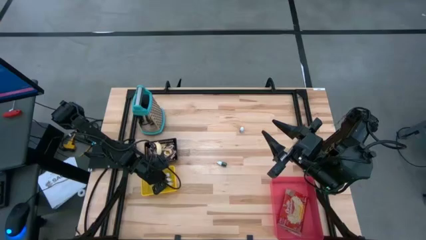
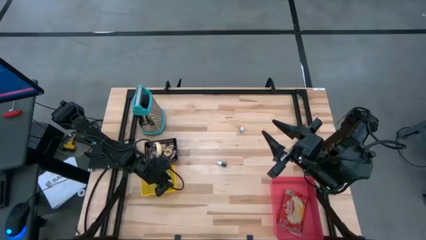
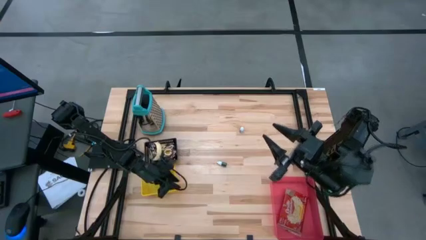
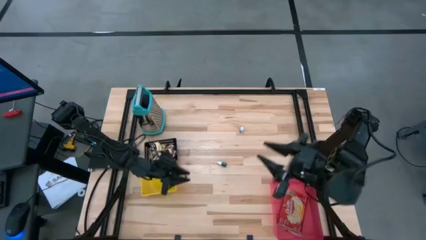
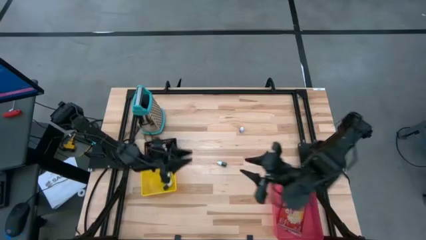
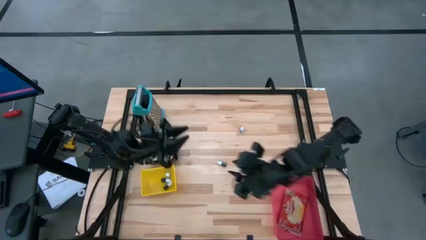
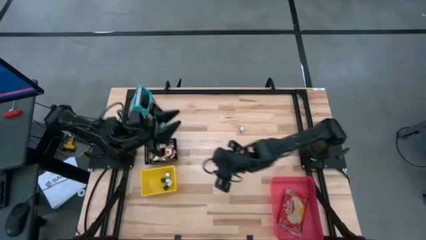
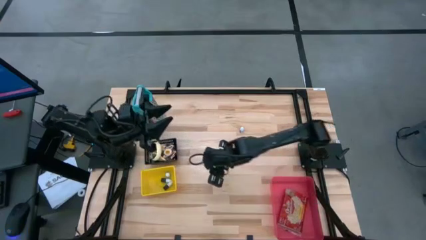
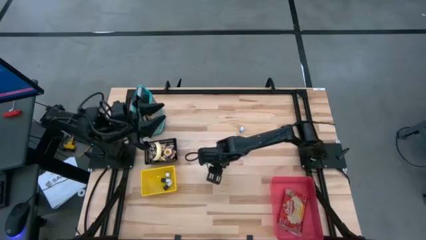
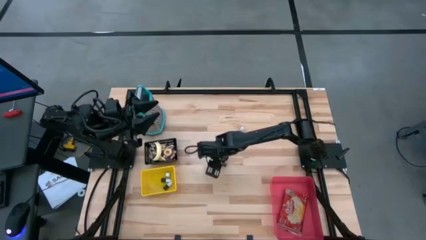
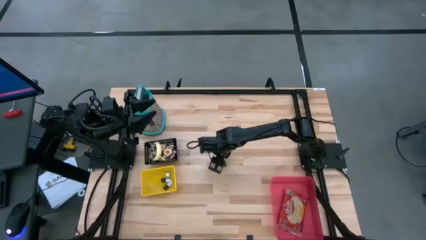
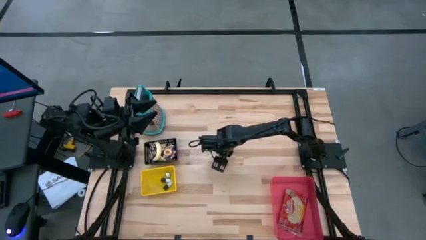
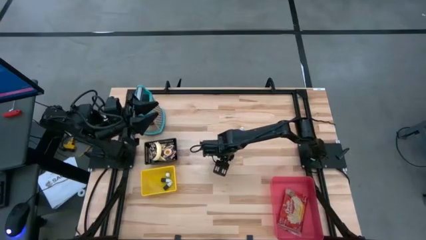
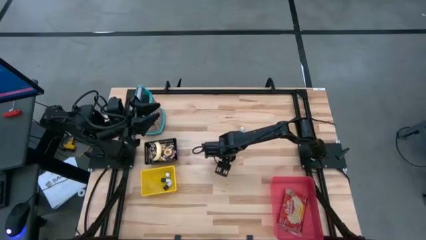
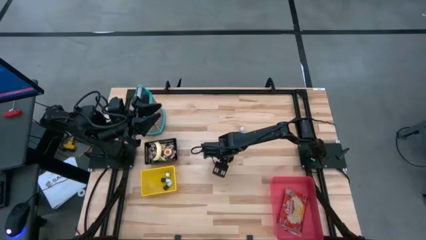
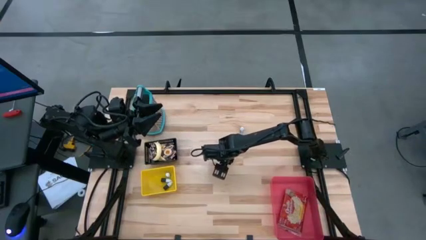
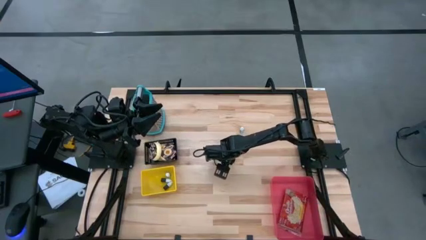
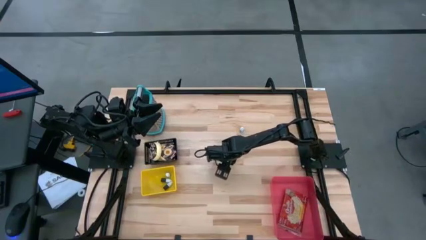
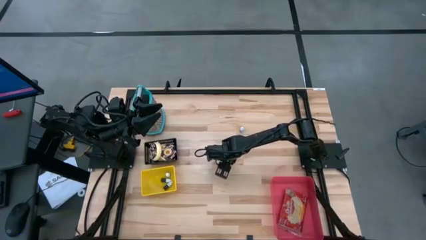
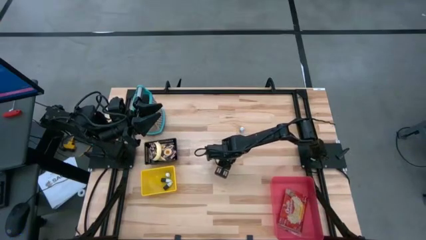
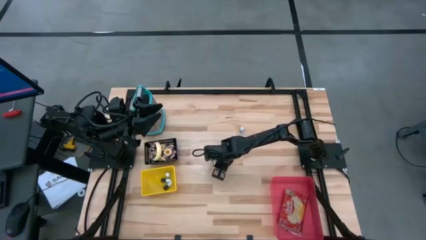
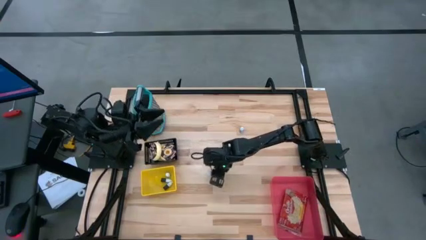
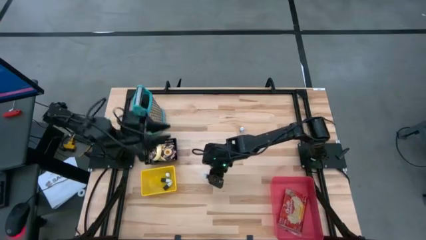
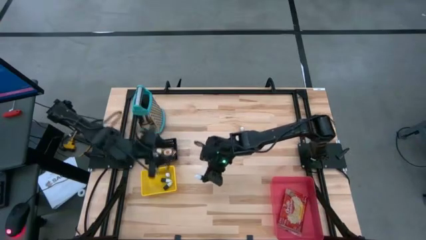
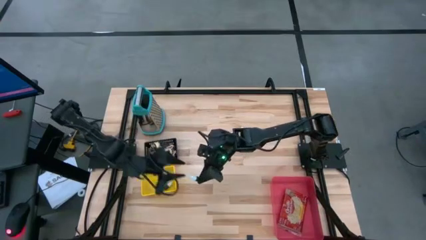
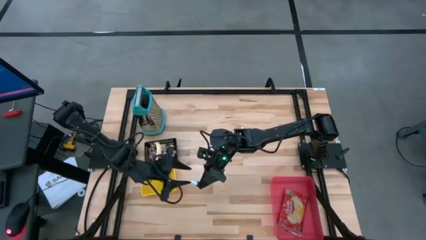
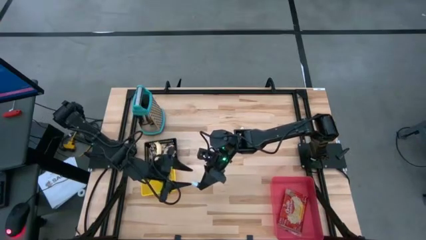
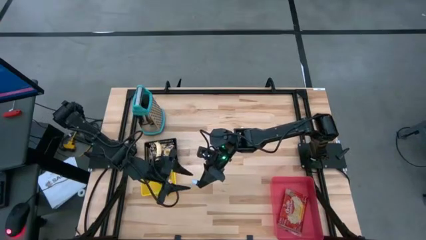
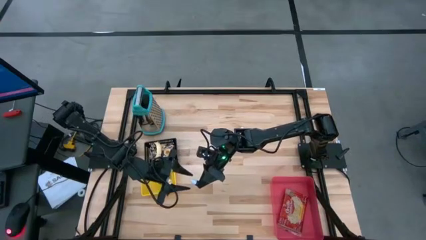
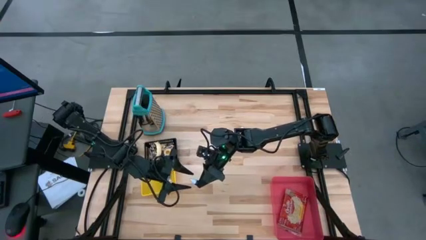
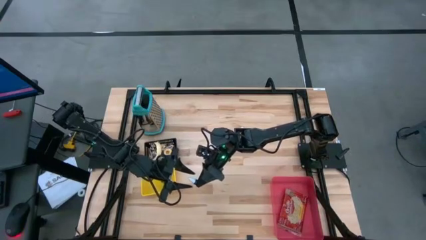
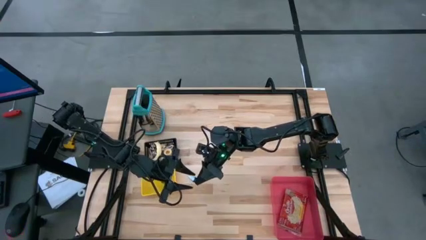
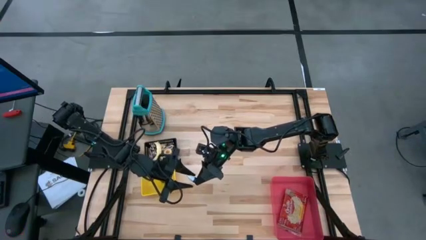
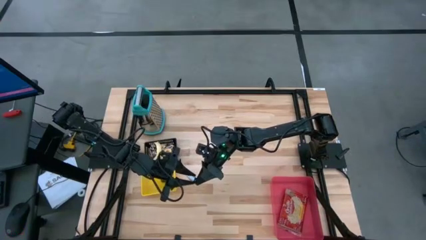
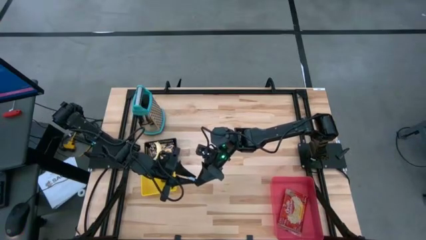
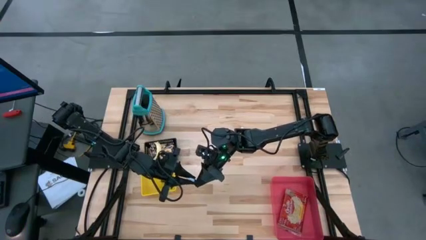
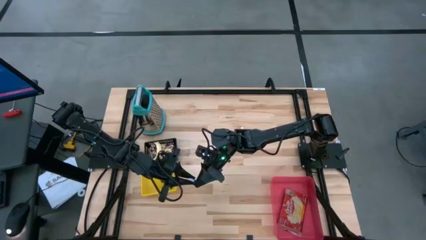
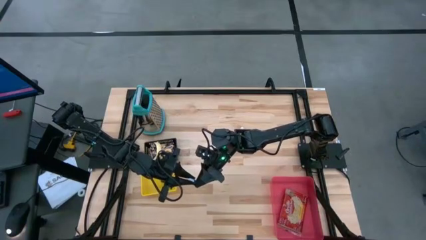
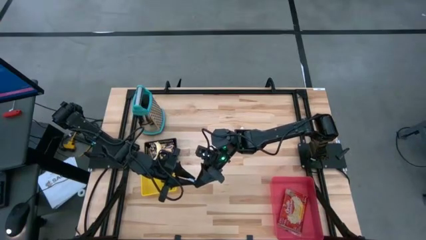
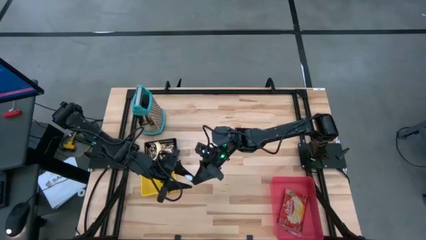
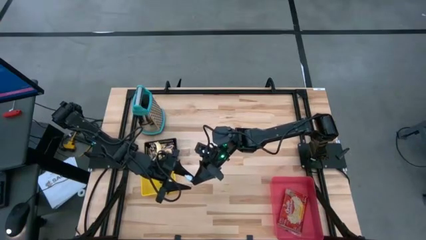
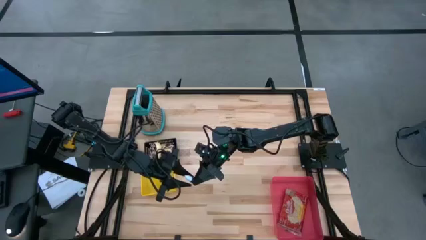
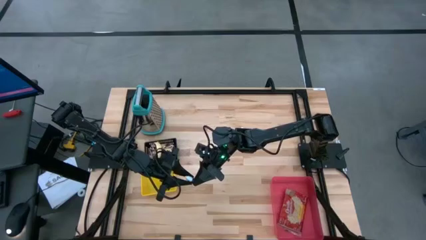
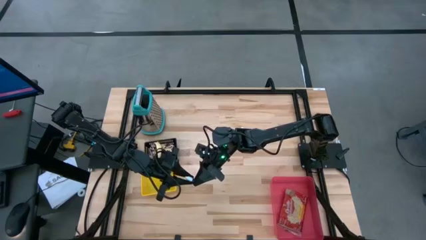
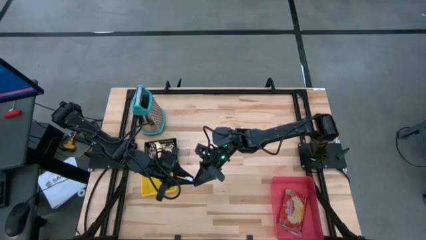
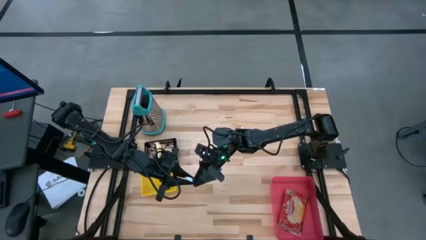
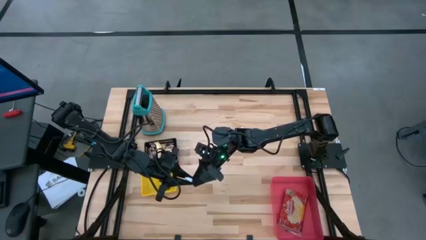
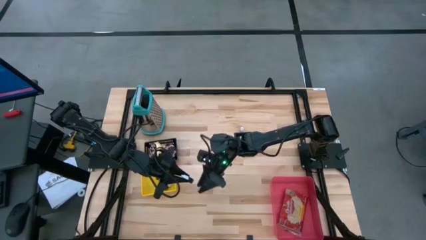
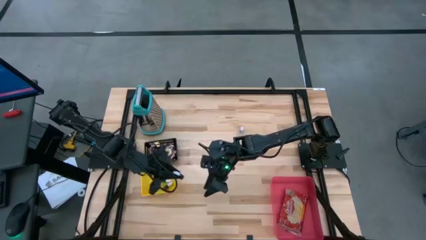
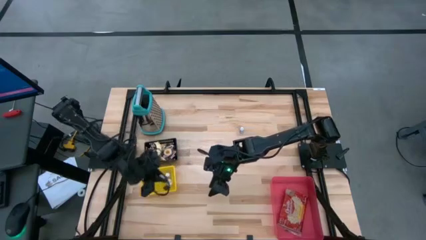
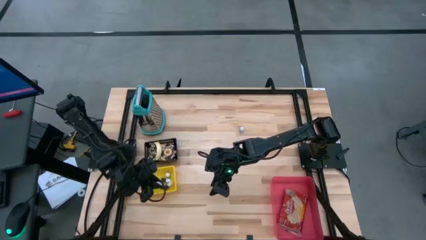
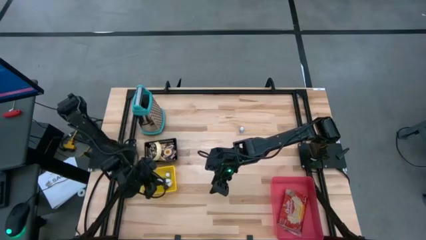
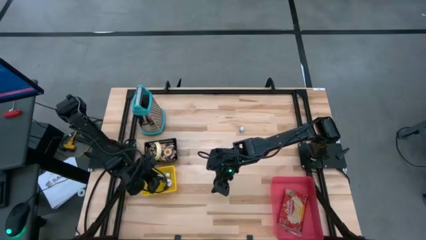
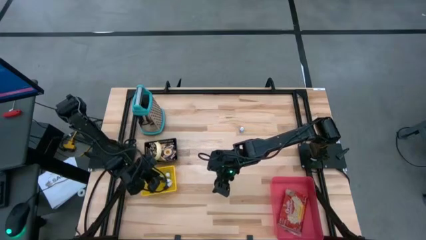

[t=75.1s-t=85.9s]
Put the green food coloring bottle into the yellow bin
